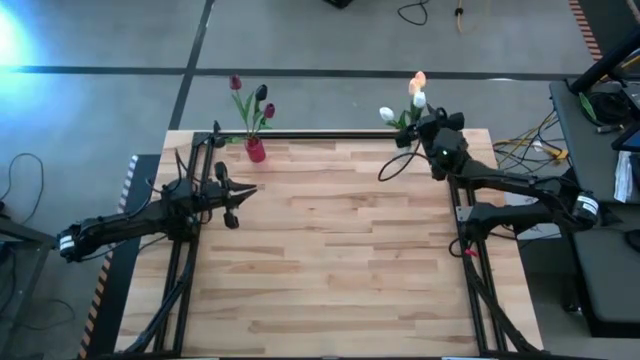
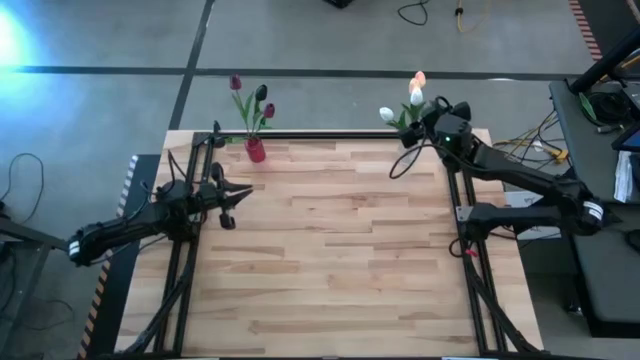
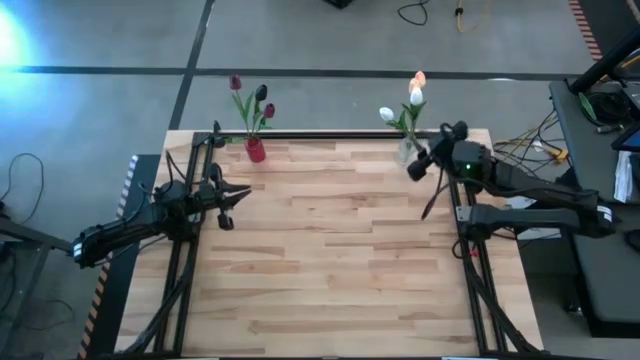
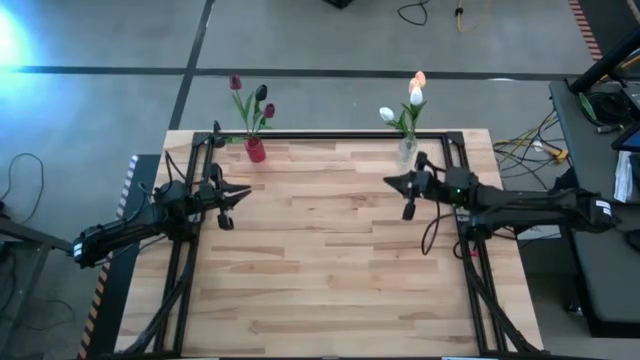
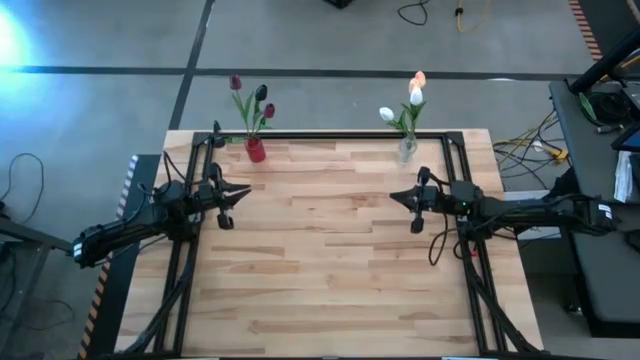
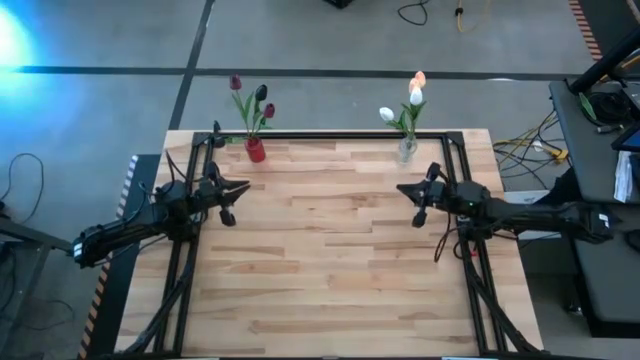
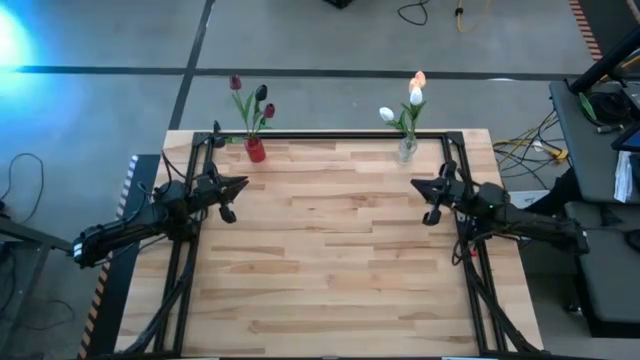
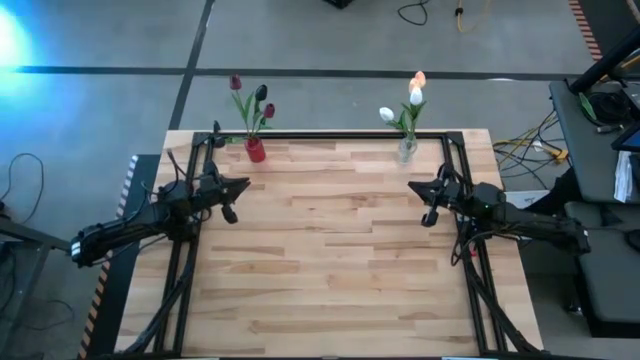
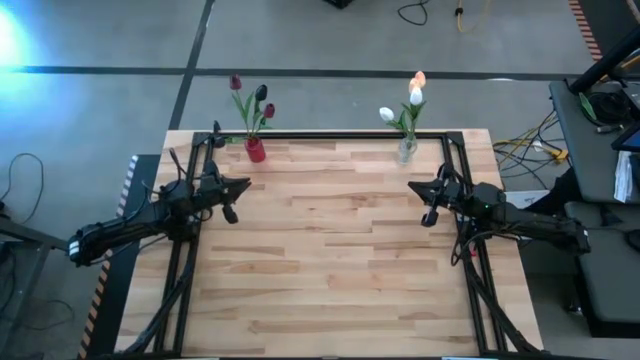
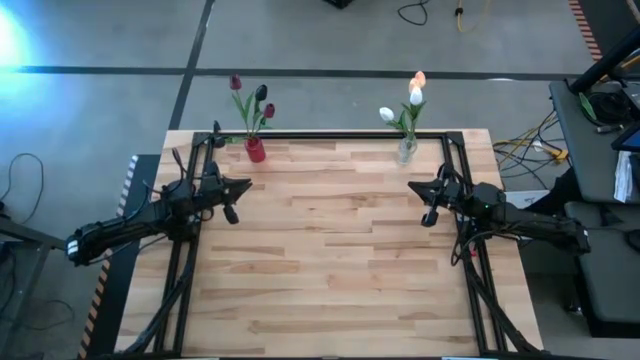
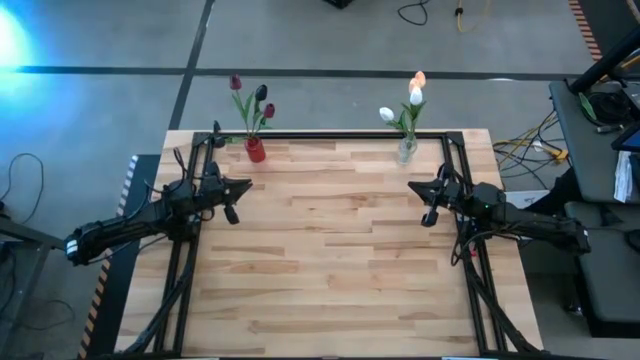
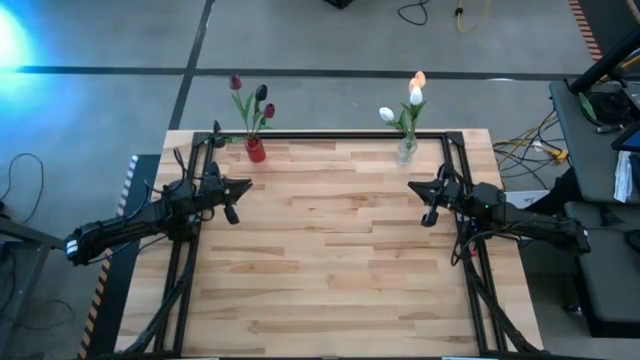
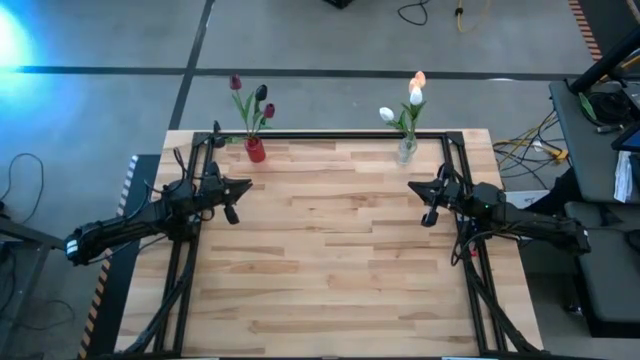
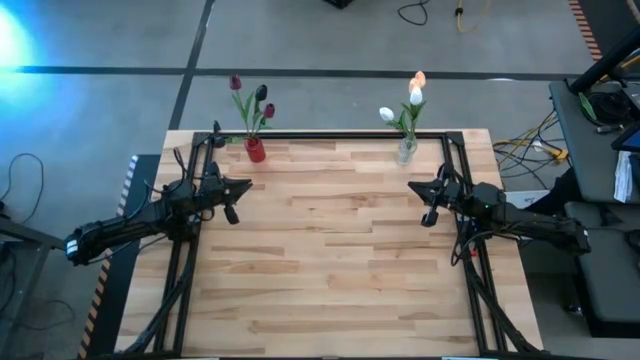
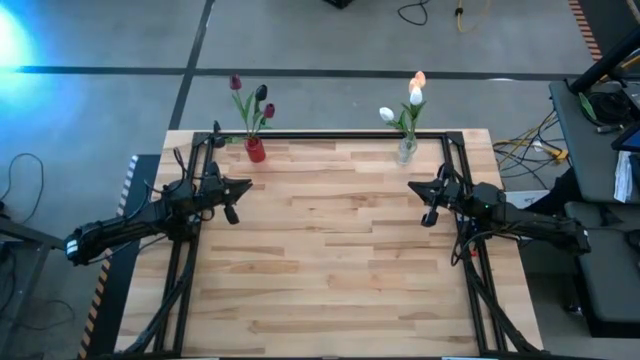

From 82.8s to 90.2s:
Task: Sort flowers into vase by color
Return to Home Position

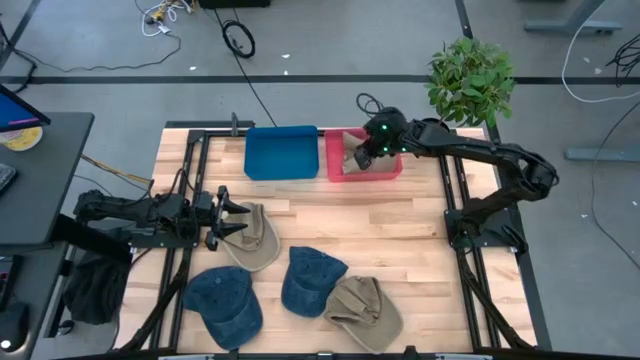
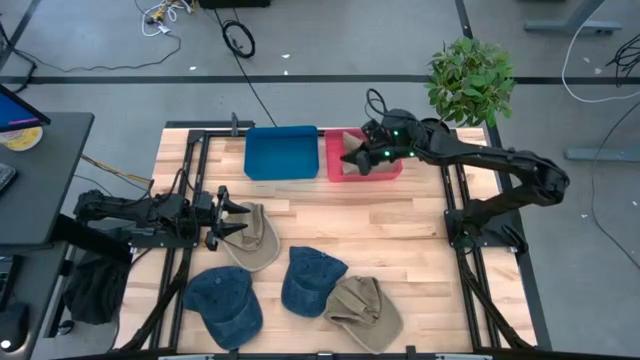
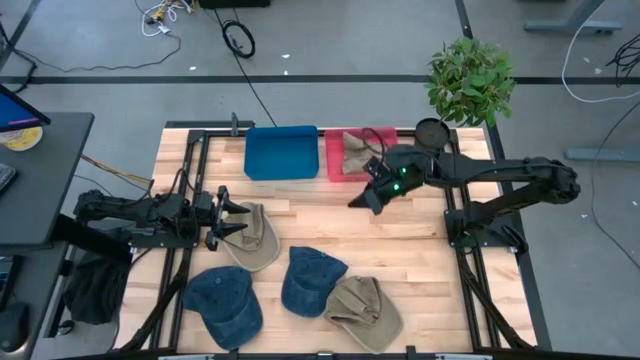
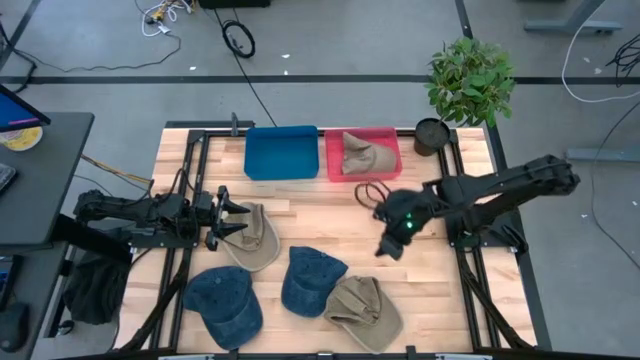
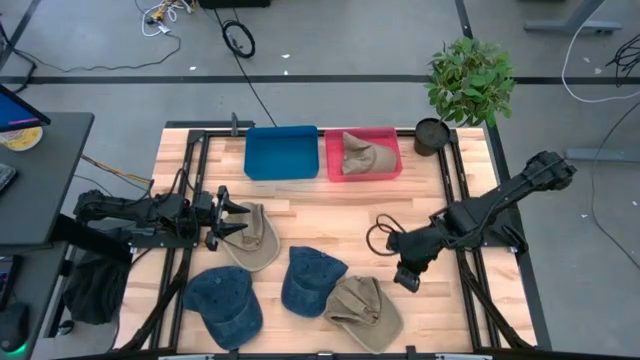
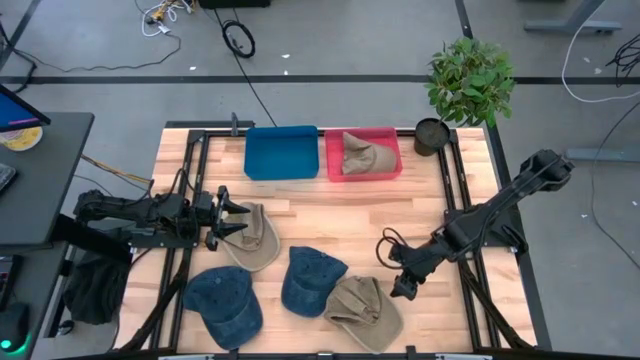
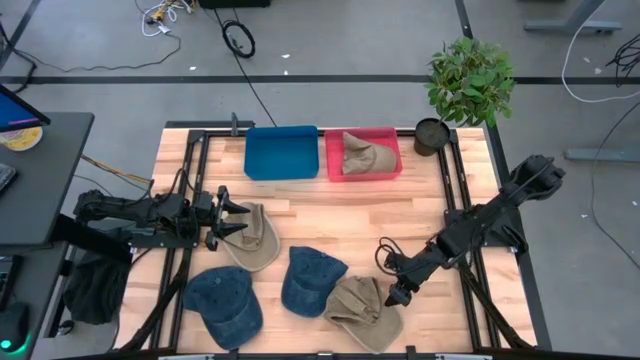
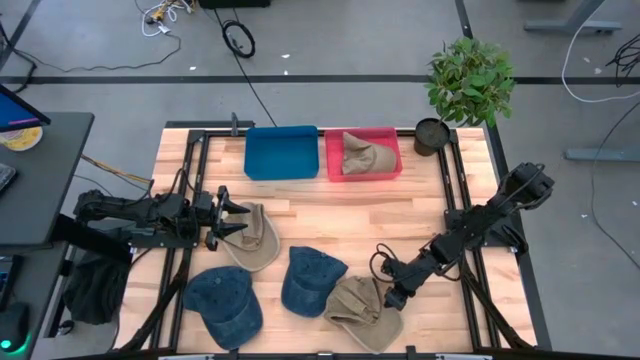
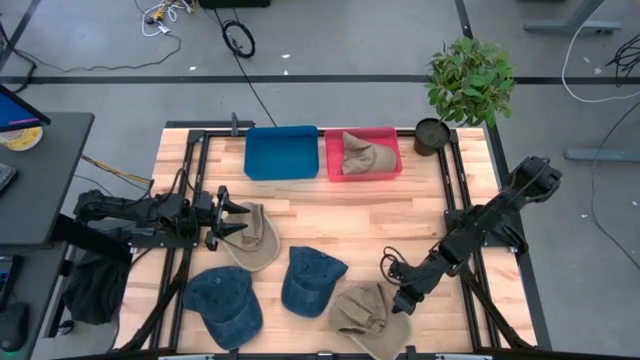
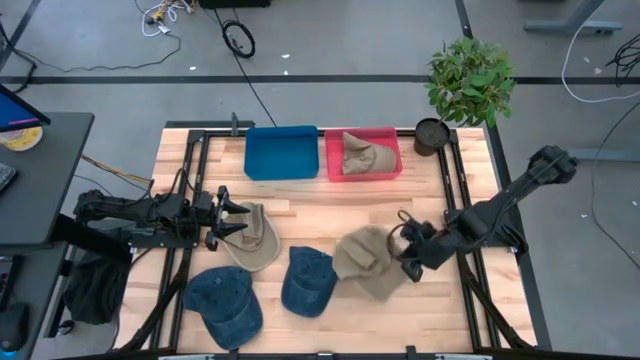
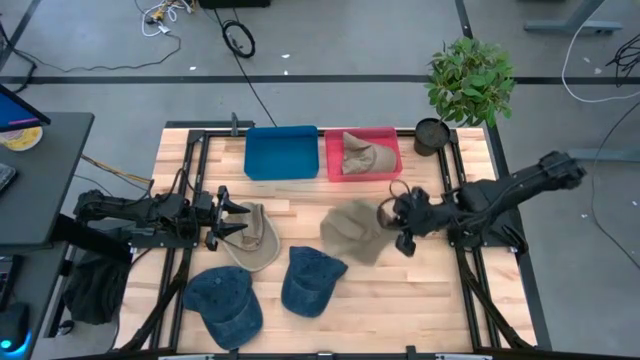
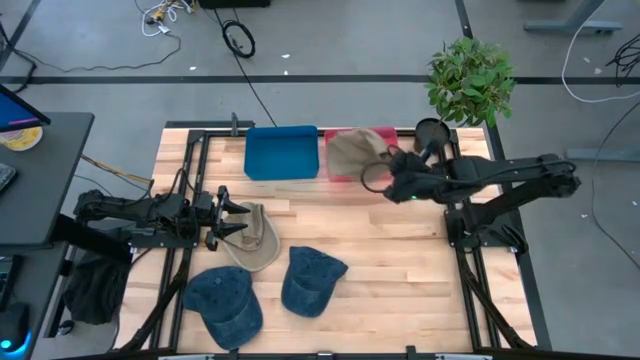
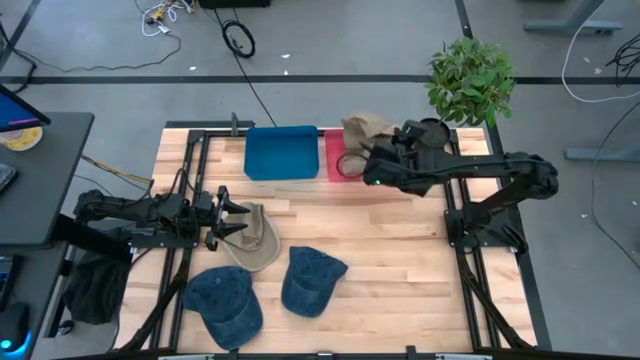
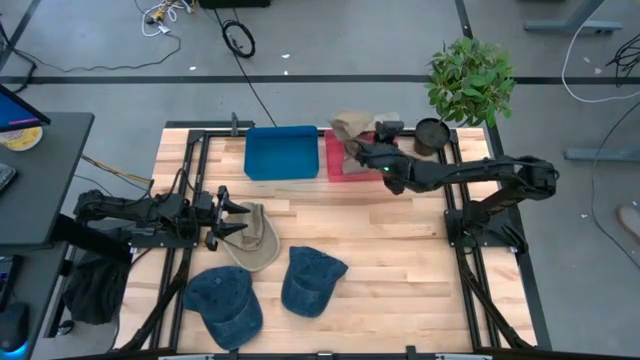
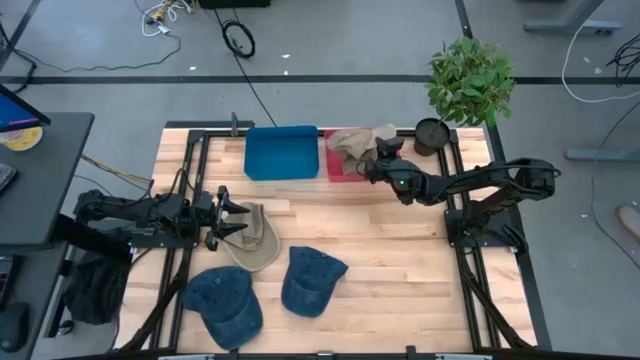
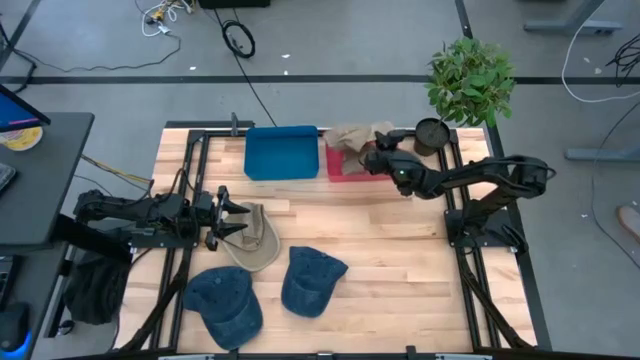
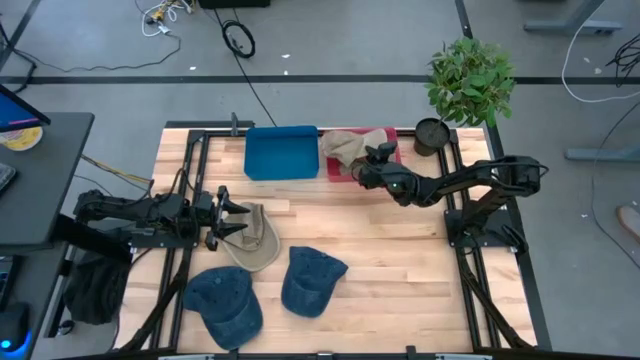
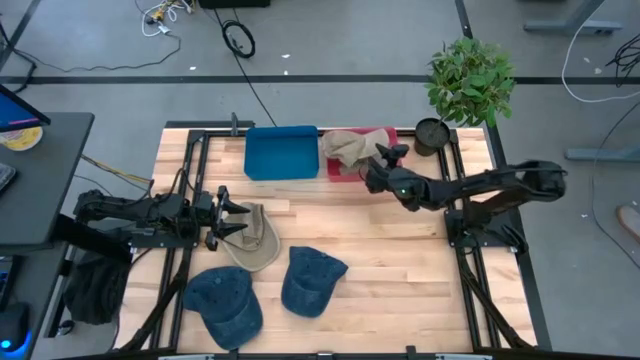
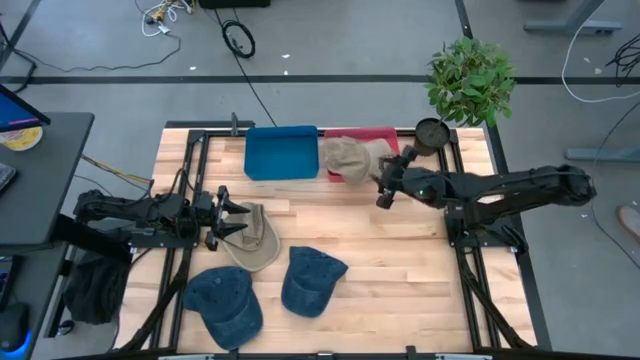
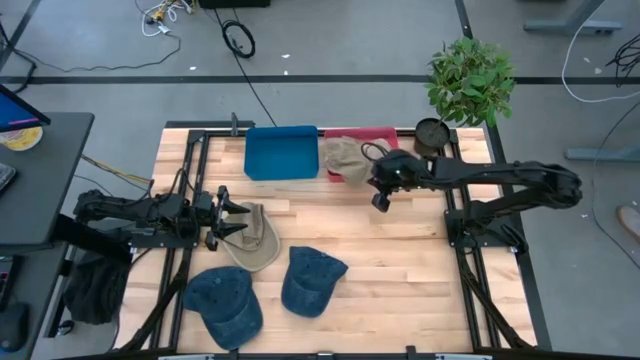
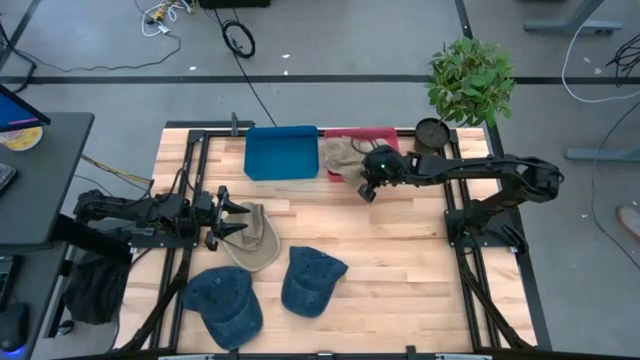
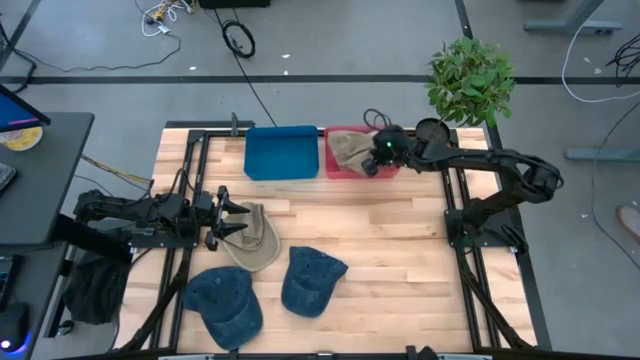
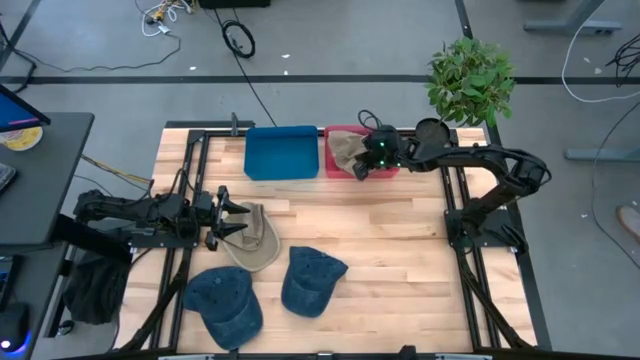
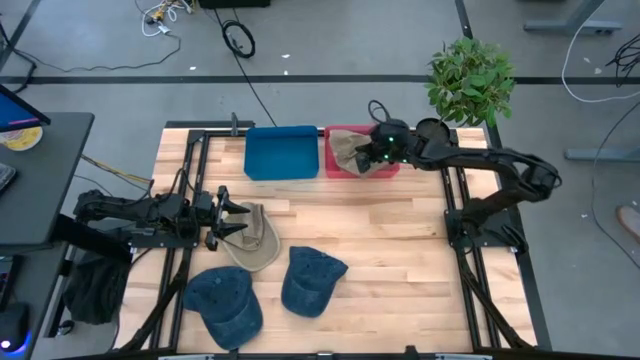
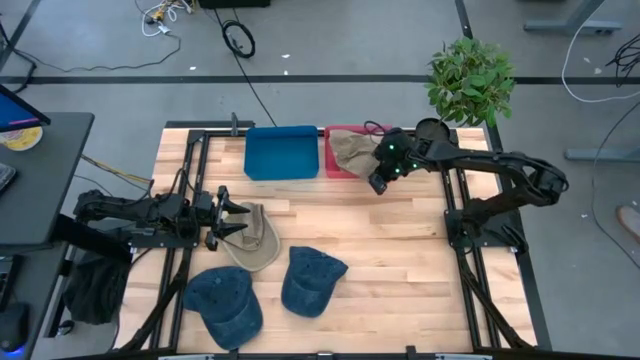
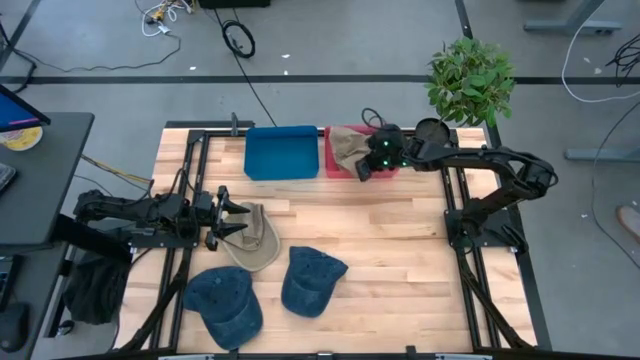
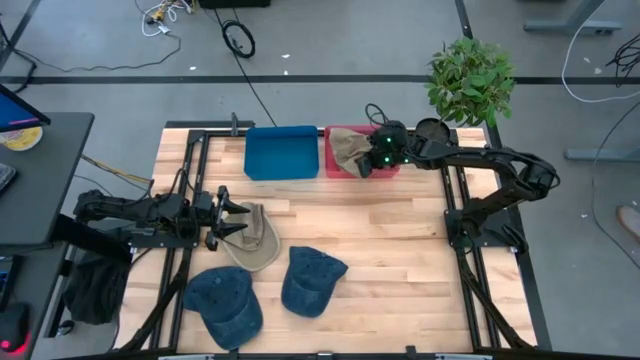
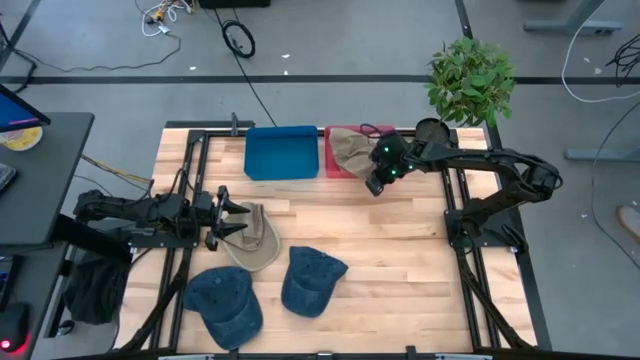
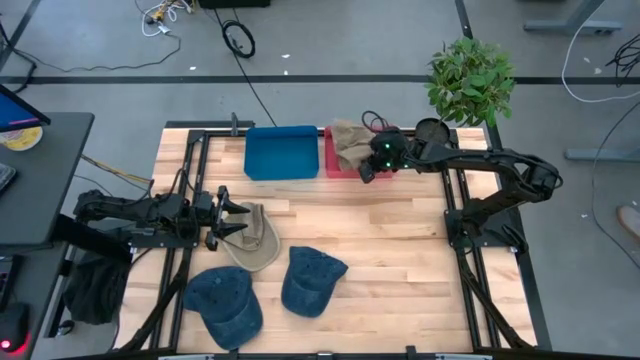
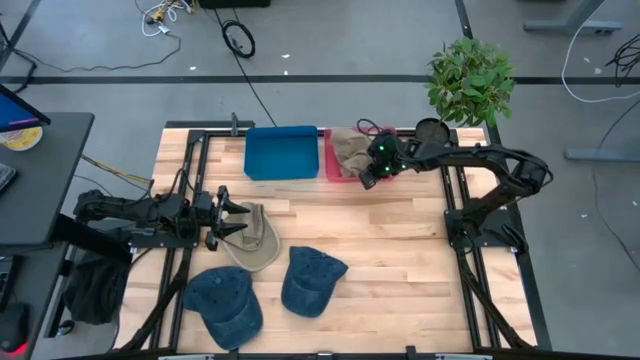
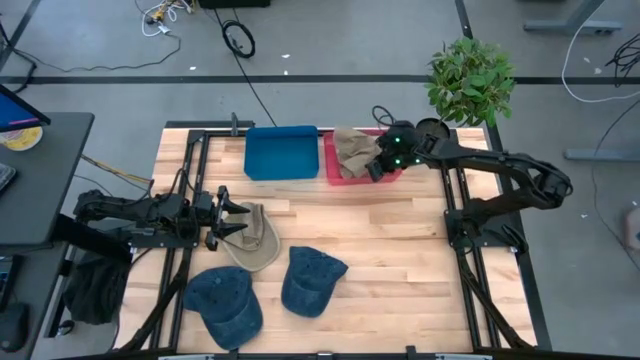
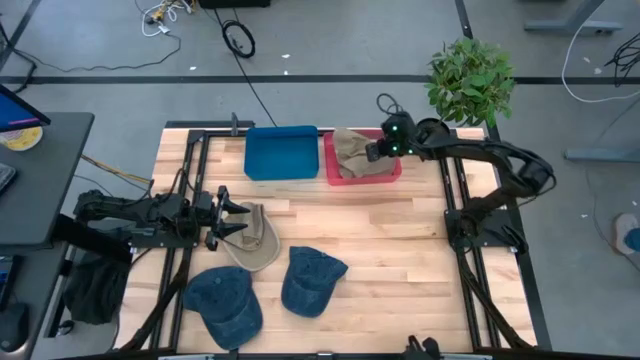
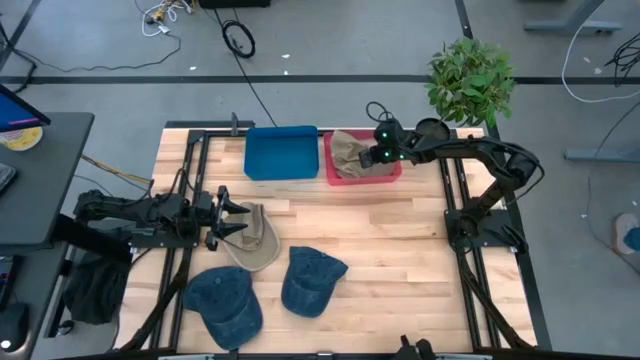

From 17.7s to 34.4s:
Task: Pick & Place hat
Put the bottom brown cap into the red bin
